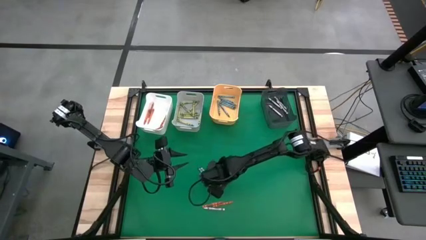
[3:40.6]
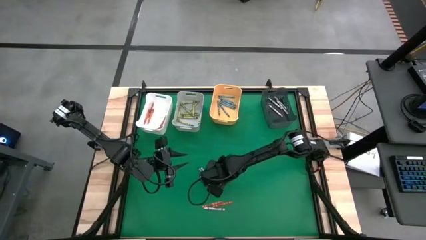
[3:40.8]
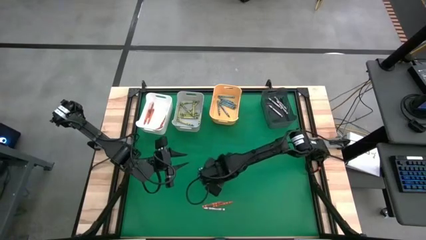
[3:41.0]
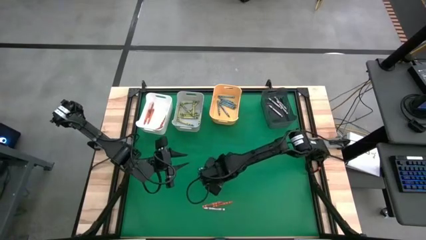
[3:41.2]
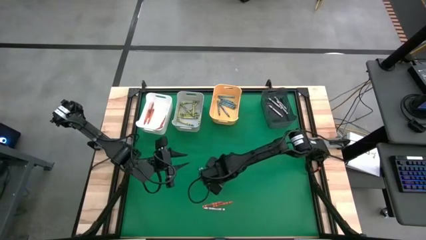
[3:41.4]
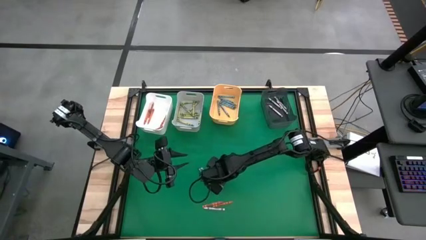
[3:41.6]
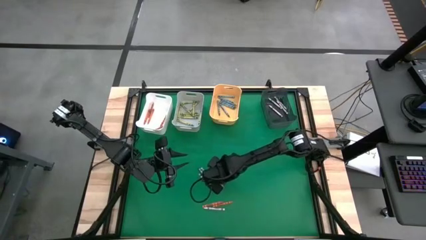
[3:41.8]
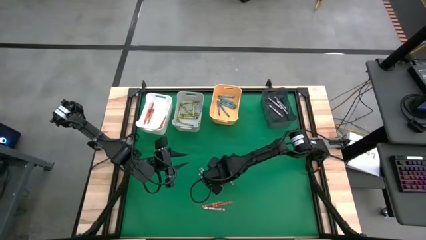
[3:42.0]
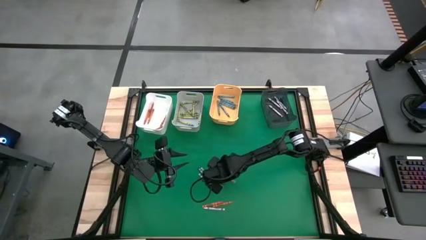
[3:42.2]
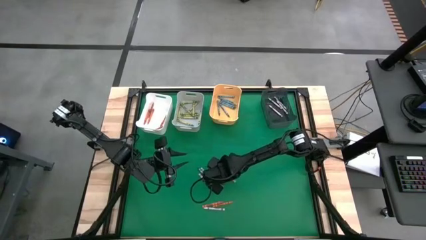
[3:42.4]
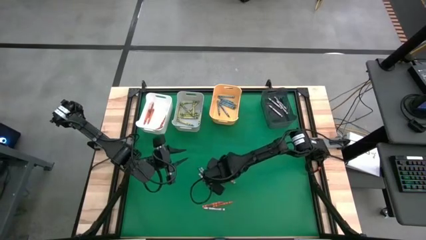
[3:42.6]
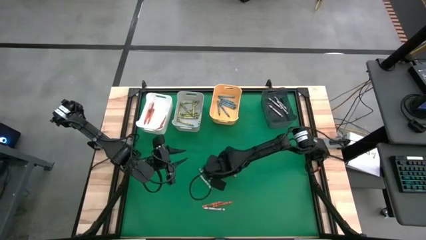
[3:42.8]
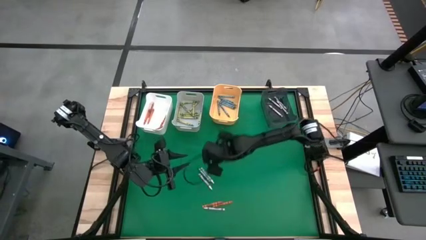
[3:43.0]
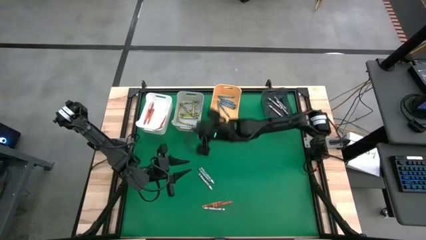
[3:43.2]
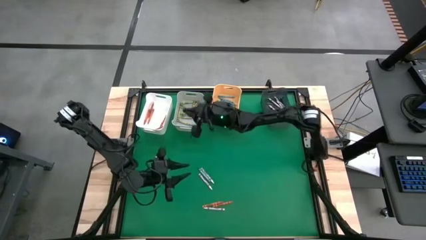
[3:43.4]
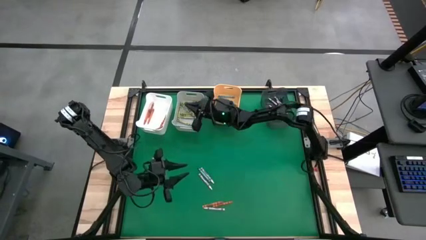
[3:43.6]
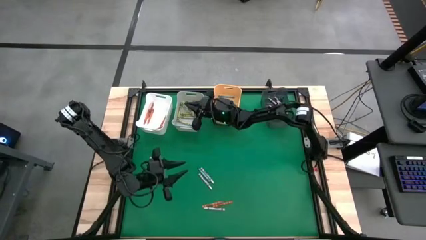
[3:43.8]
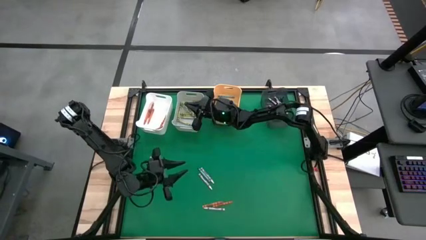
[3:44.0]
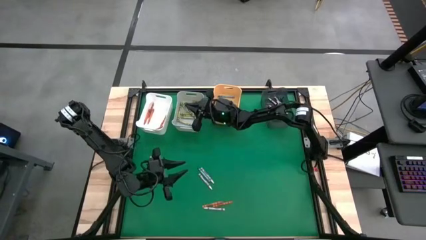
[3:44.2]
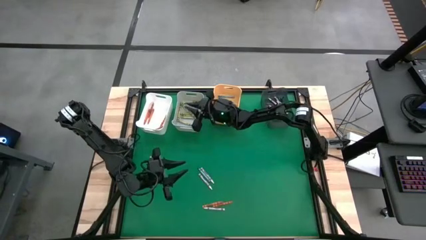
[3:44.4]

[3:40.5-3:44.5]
Task: Sort crayons
Put the green crayon into the gray bin

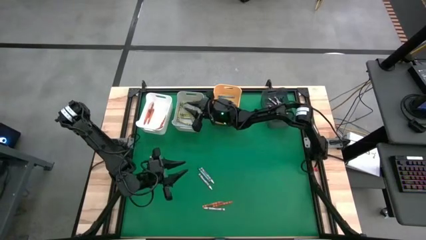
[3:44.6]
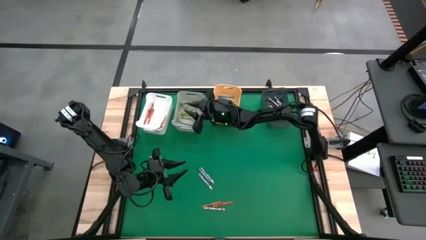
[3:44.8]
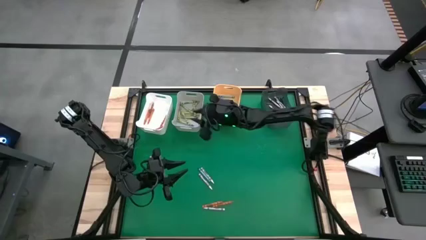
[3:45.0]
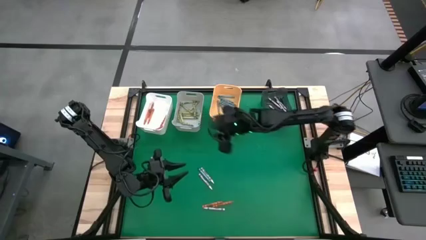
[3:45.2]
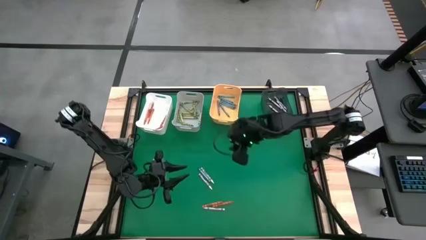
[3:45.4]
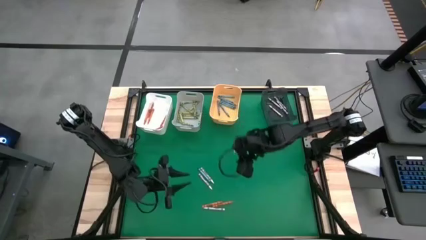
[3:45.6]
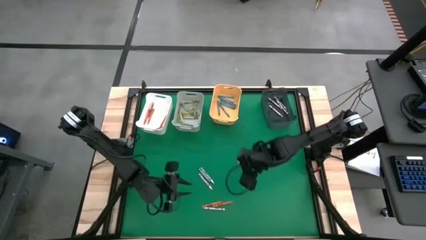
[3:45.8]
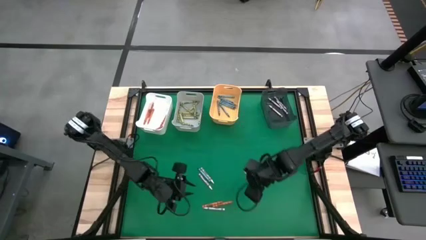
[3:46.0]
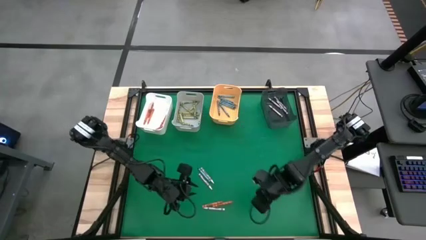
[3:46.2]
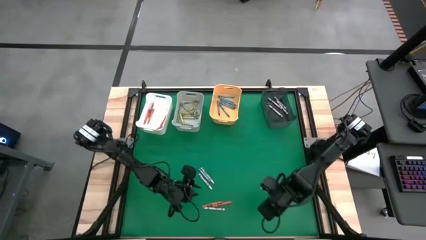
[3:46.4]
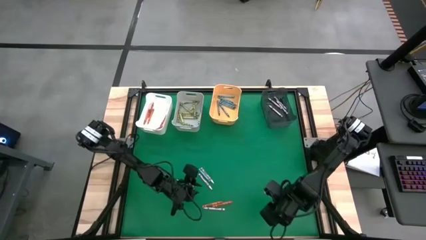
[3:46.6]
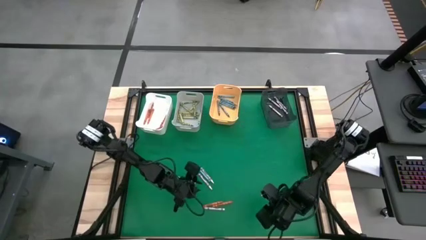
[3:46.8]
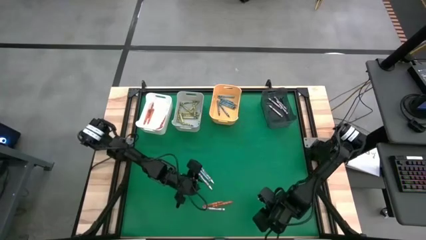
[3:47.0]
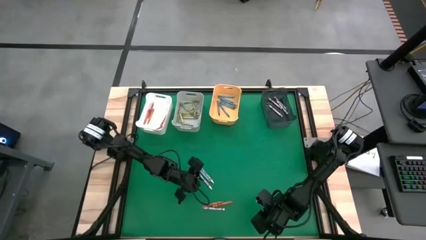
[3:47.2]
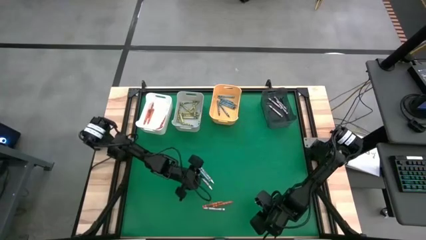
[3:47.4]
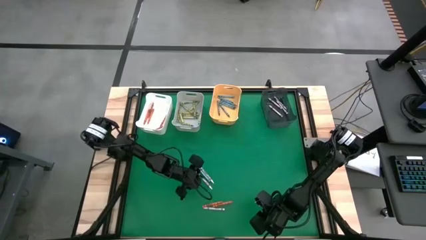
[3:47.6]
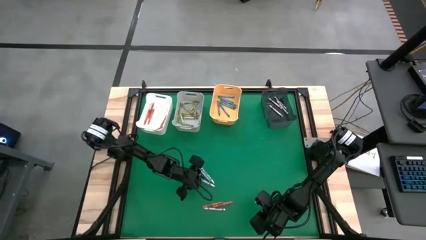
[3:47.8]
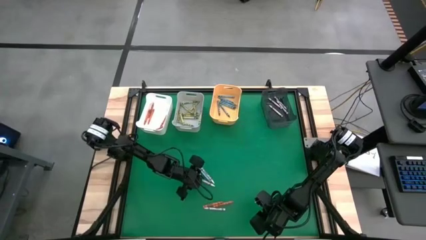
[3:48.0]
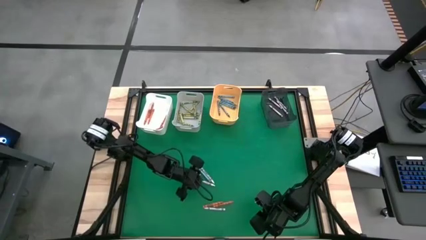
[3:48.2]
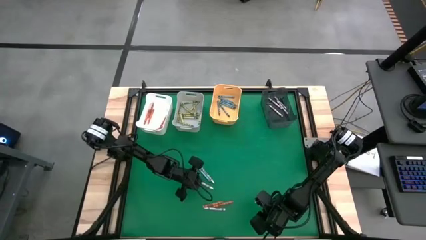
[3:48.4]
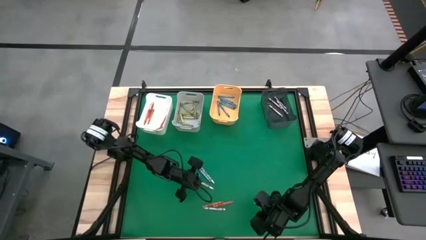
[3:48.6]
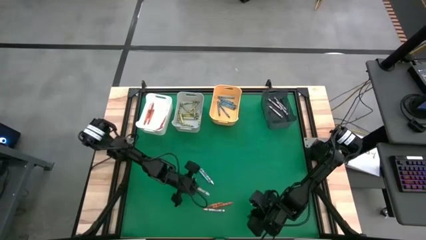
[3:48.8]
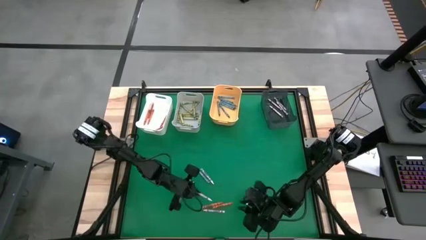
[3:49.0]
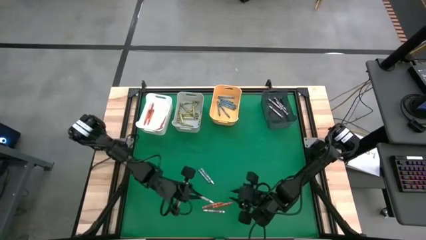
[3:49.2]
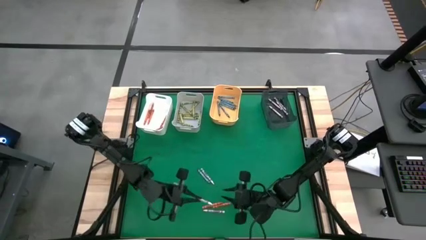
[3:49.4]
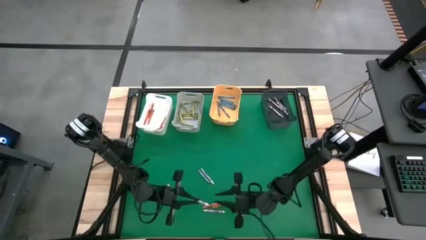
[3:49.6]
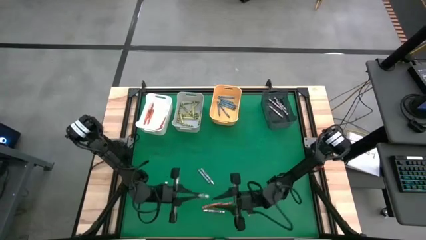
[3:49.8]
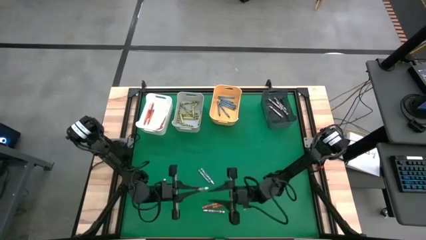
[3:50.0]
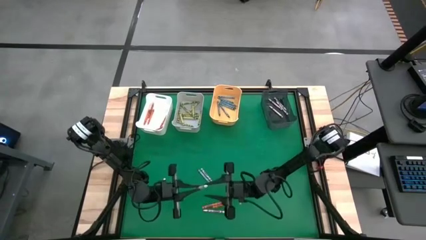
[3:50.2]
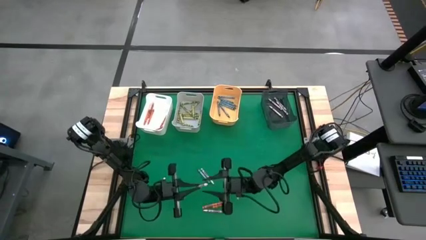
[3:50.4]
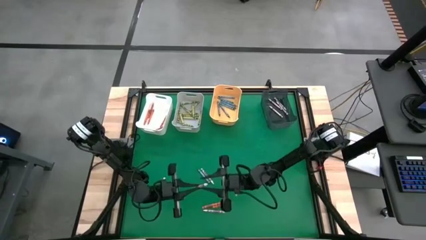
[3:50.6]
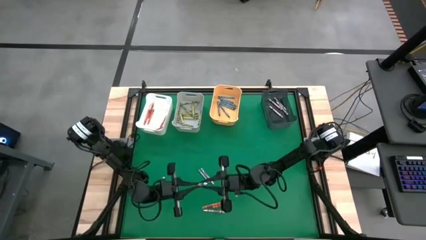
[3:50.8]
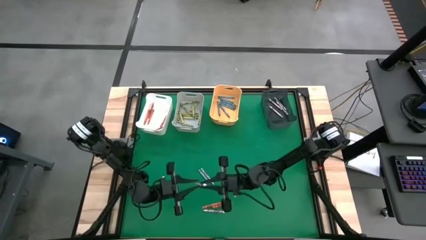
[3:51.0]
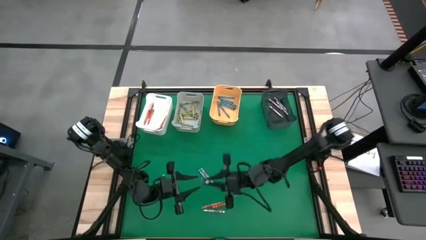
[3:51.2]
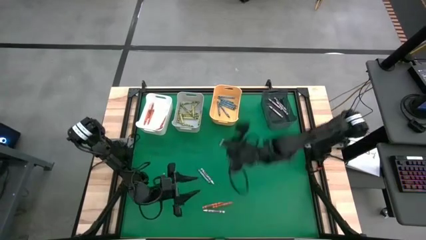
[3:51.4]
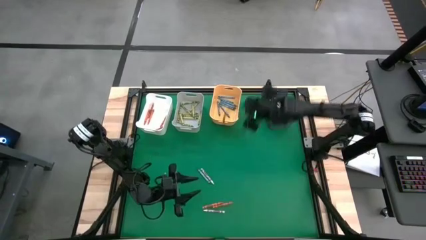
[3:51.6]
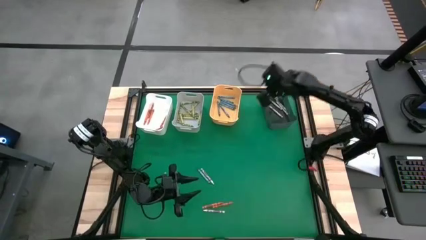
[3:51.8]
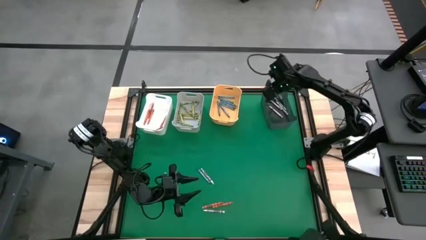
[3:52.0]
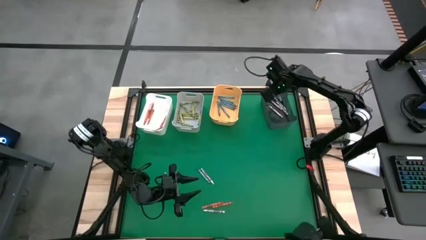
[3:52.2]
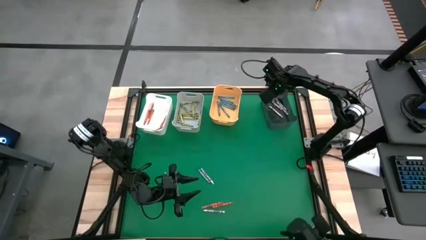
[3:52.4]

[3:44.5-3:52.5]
Put the white crayon into the black bin

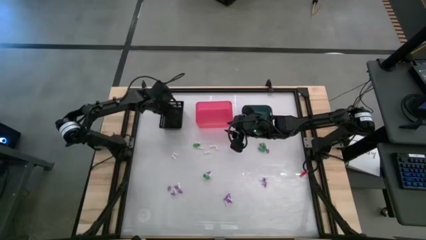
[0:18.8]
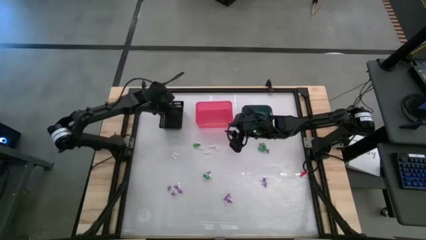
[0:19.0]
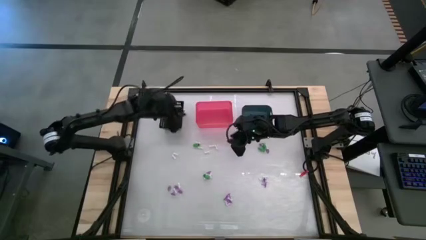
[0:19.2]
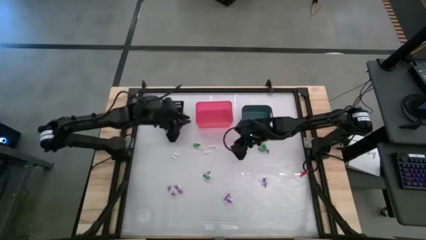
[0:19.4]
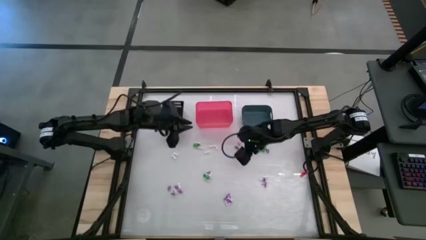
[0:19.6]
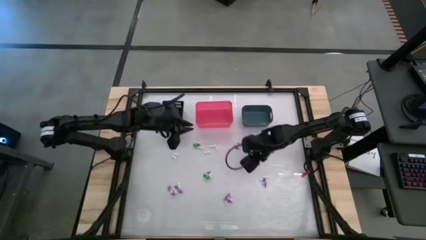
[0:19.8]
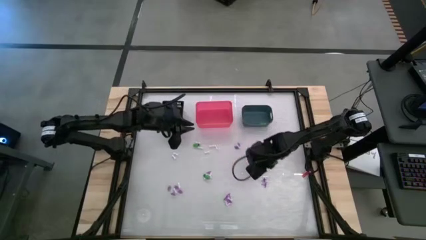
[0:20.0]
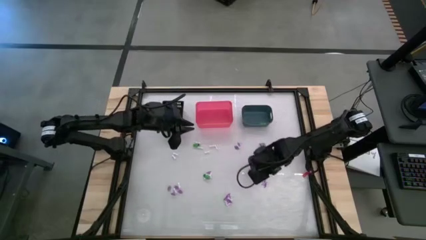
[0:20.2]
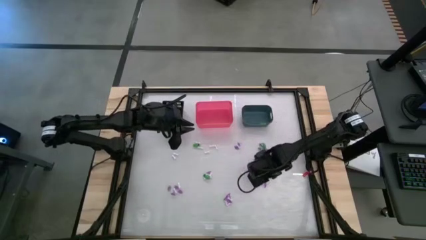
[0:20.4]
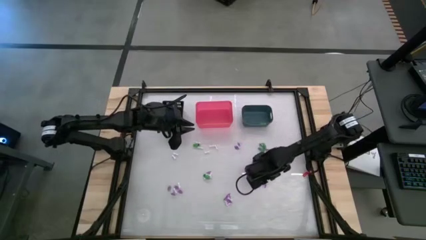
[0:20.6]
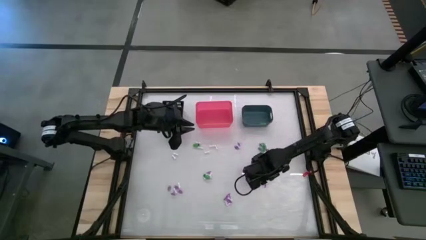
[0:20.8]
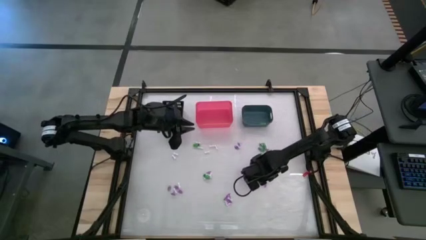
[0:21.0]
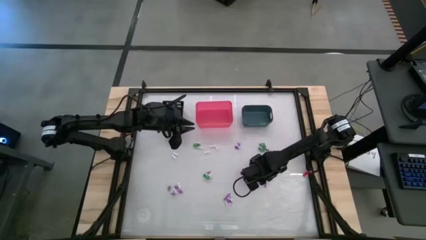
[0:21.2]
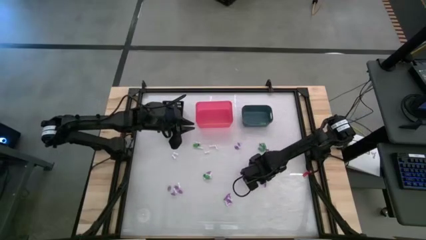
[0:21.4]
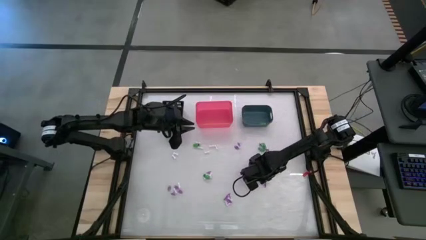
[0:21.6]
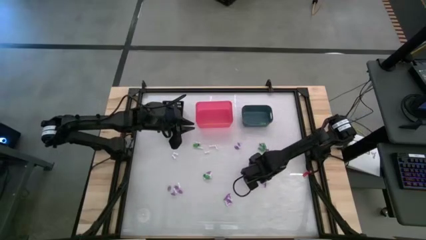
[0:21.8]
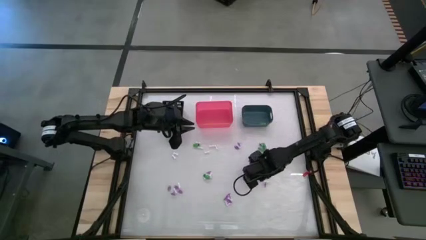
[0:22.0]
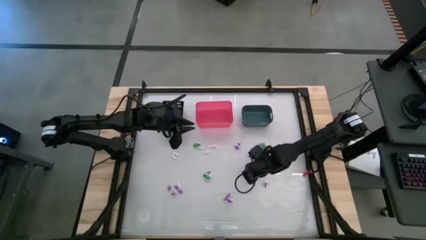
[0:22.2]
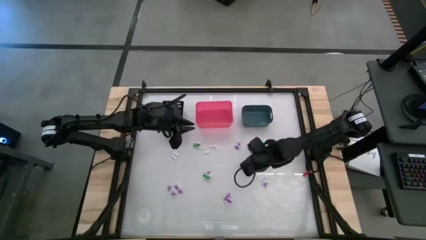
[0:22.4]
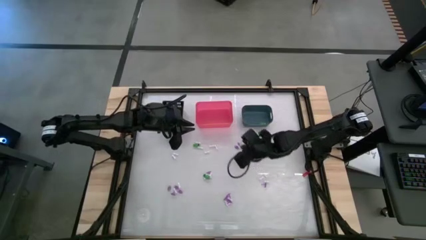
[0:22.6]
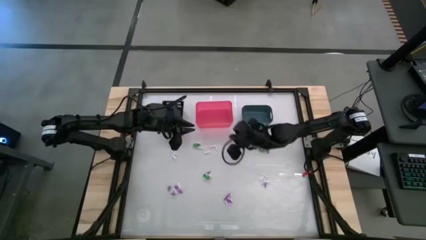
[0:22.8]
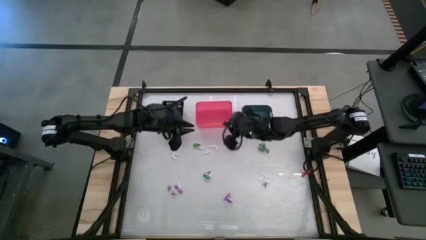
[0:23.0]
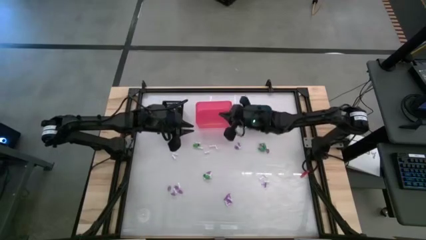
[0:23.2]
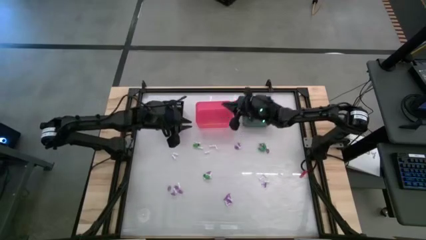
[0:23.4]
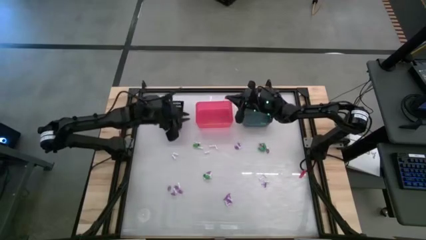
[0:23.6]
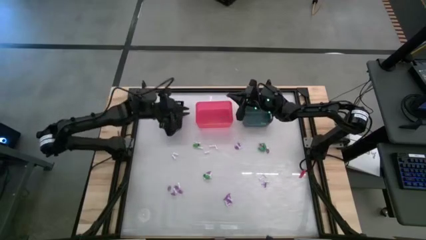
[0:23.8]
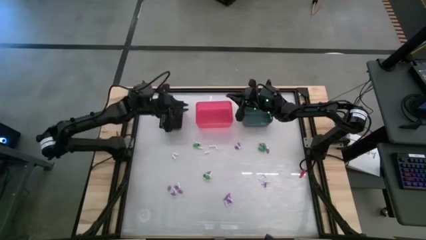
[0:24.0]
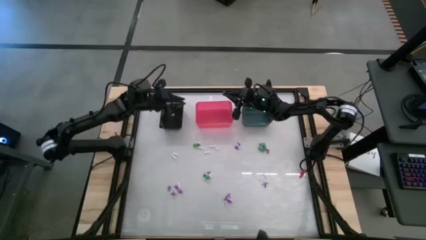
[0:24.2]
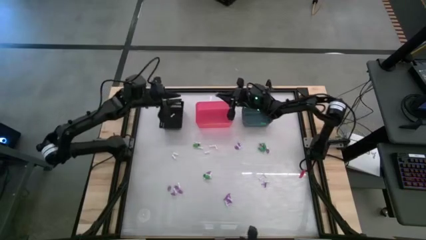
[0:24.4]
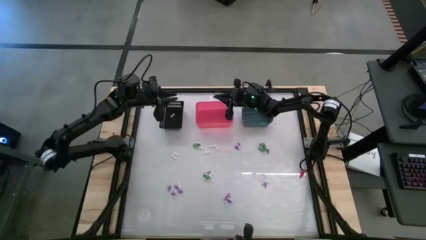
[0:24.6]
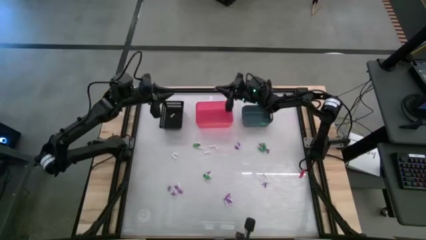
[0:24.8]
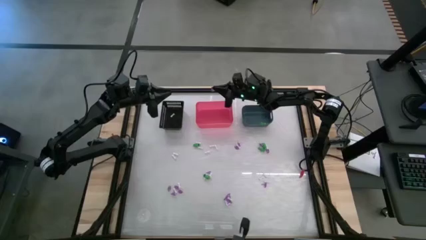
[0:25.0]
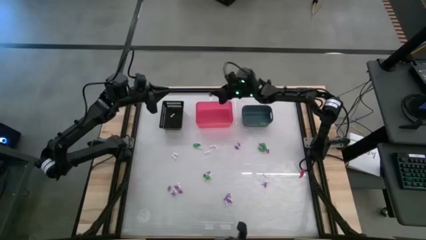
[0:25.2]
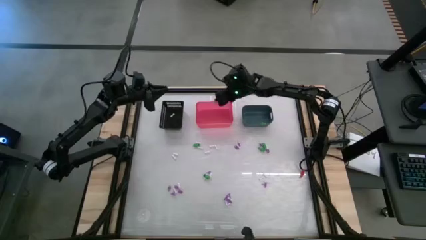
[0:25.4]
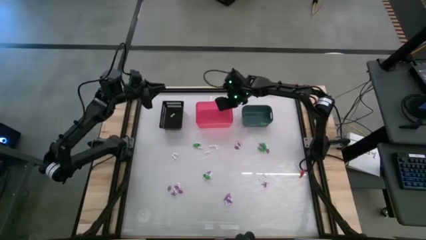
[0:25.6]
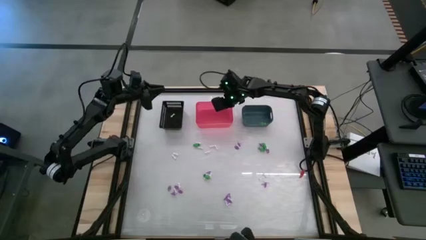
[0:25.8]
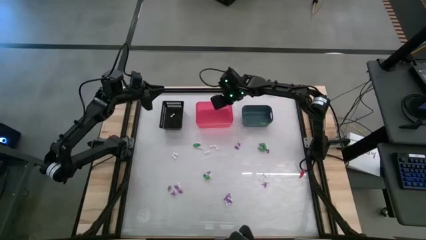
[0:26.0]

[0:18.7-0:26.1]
Task: Sort Halloween decoration
Put the purple hat toy into the pink bin
